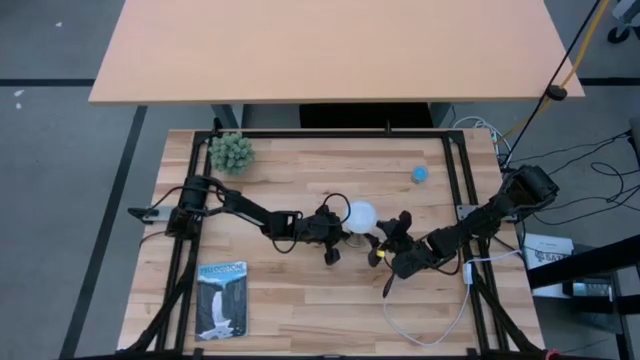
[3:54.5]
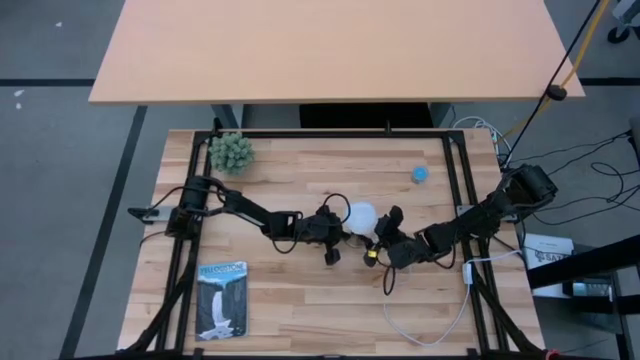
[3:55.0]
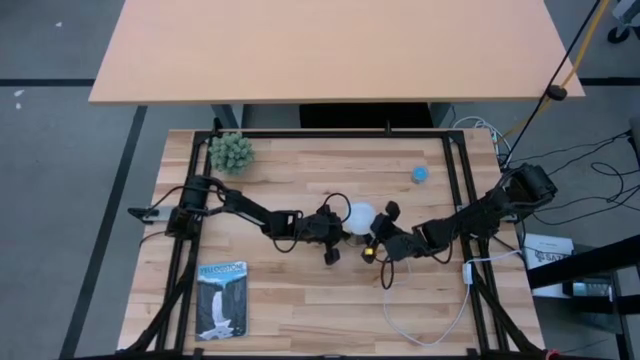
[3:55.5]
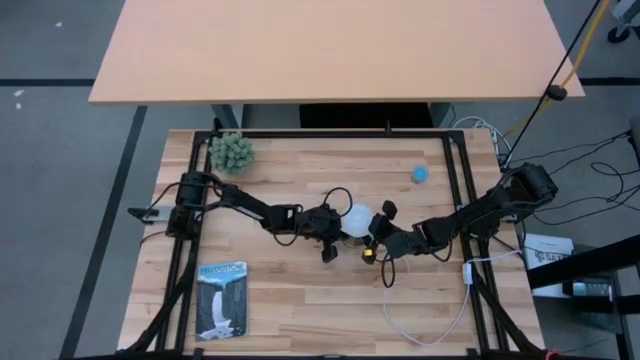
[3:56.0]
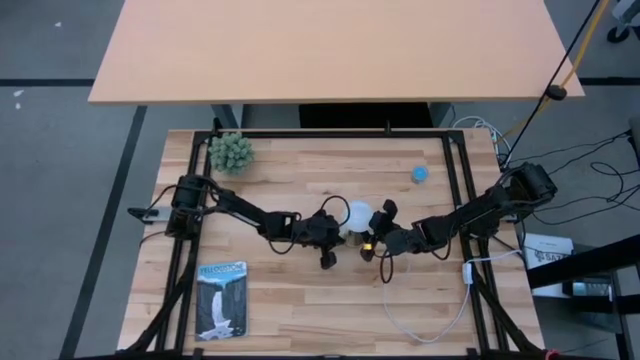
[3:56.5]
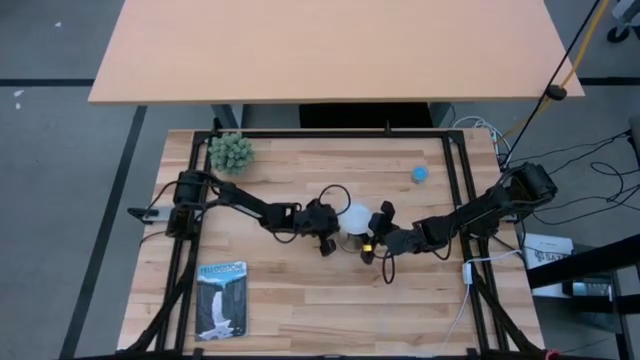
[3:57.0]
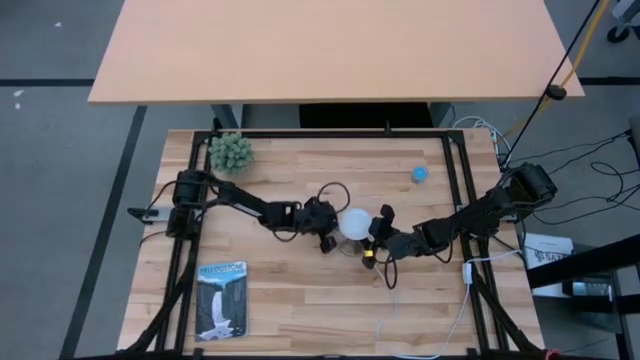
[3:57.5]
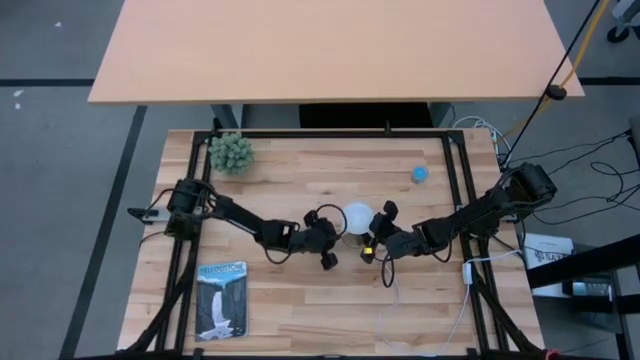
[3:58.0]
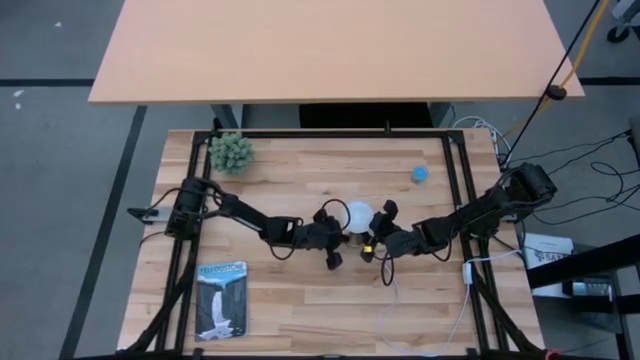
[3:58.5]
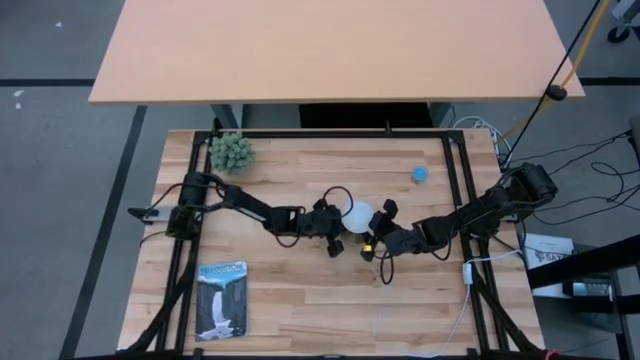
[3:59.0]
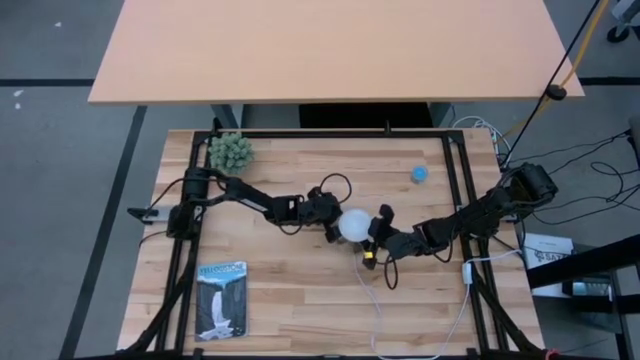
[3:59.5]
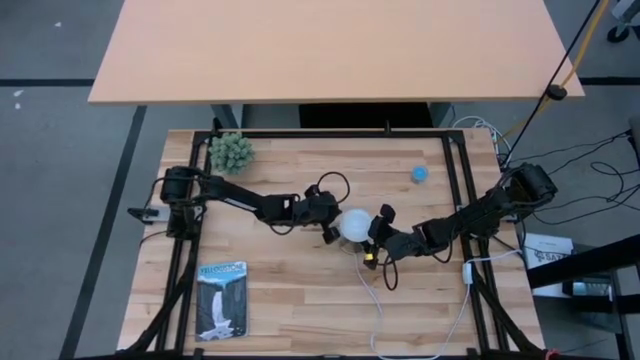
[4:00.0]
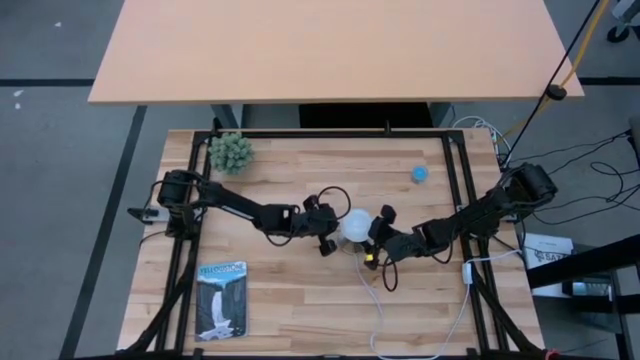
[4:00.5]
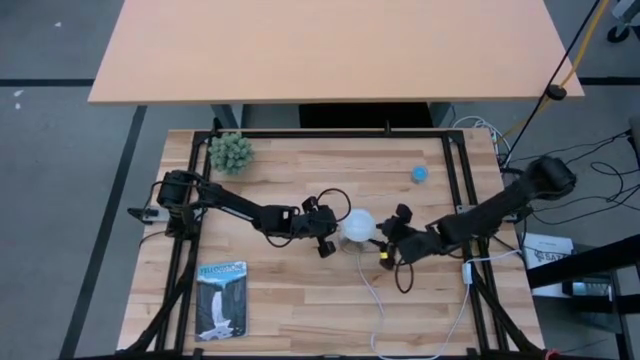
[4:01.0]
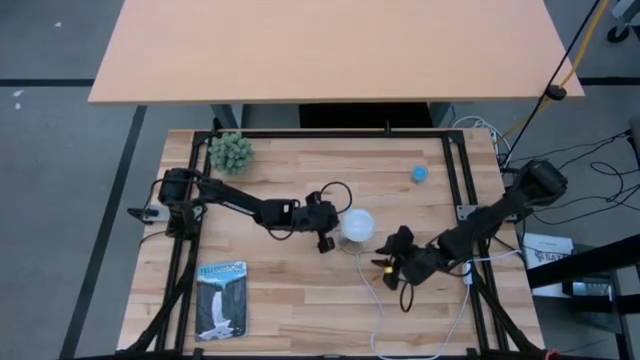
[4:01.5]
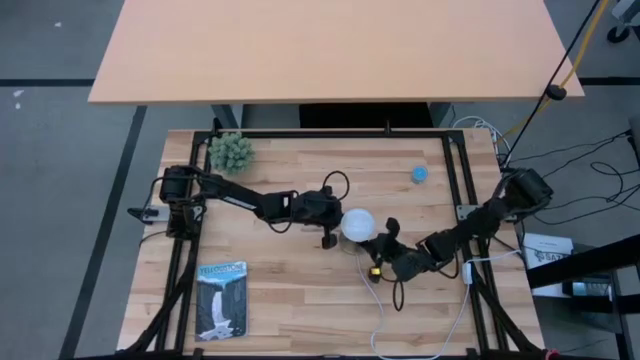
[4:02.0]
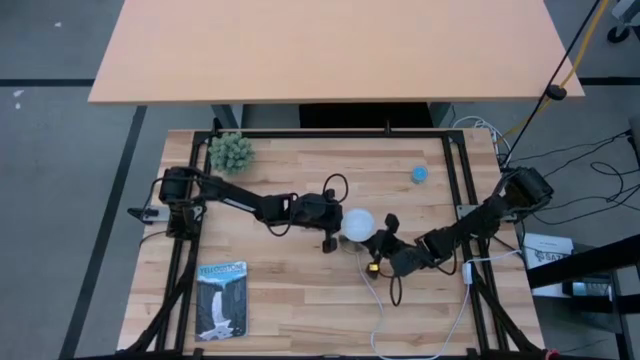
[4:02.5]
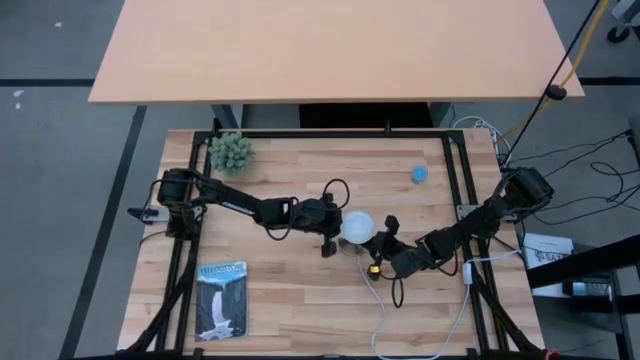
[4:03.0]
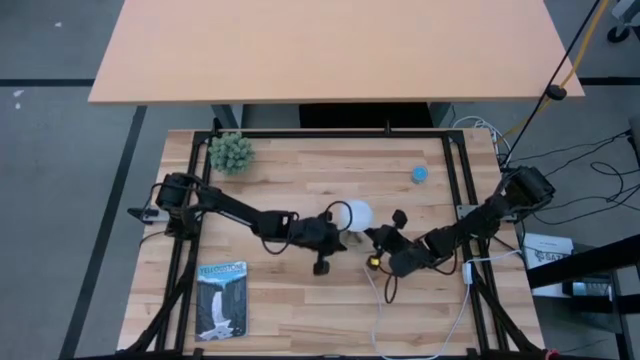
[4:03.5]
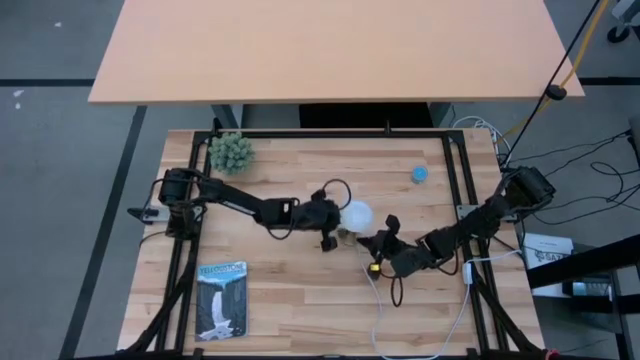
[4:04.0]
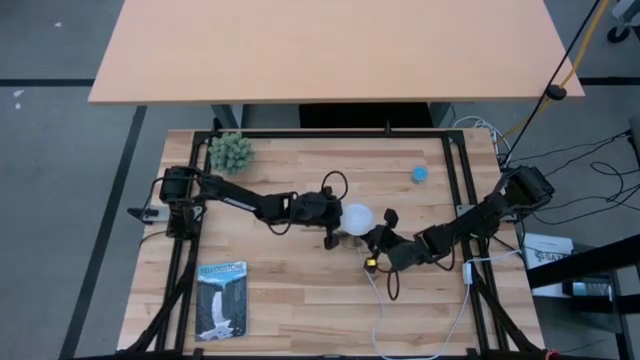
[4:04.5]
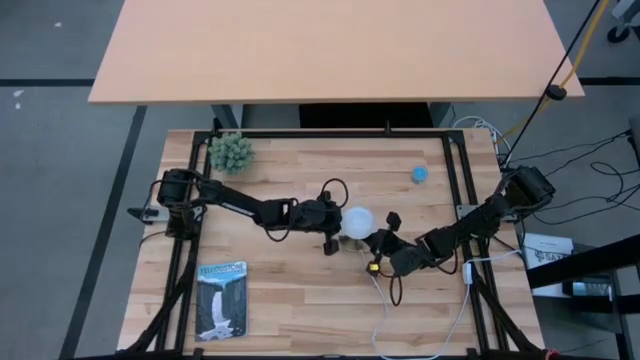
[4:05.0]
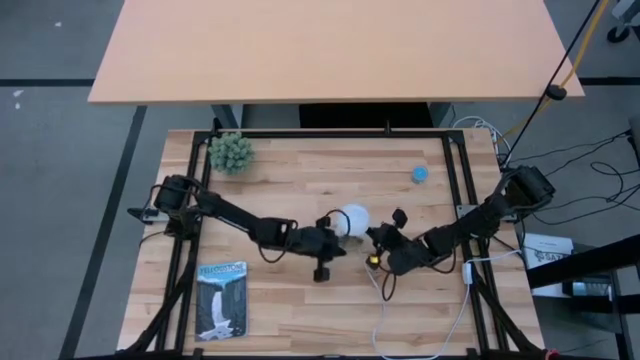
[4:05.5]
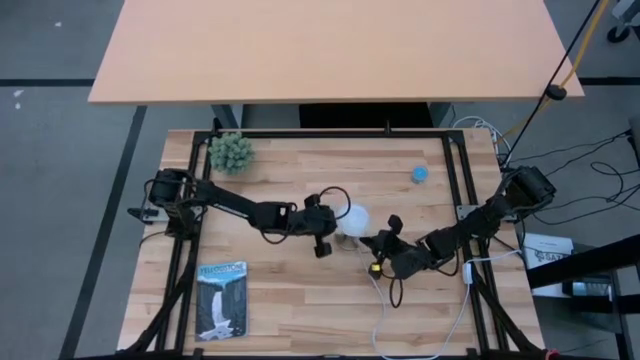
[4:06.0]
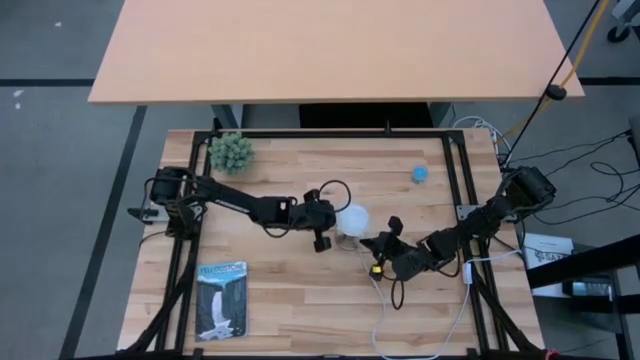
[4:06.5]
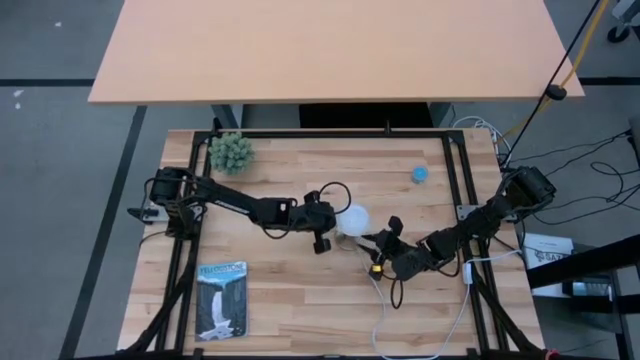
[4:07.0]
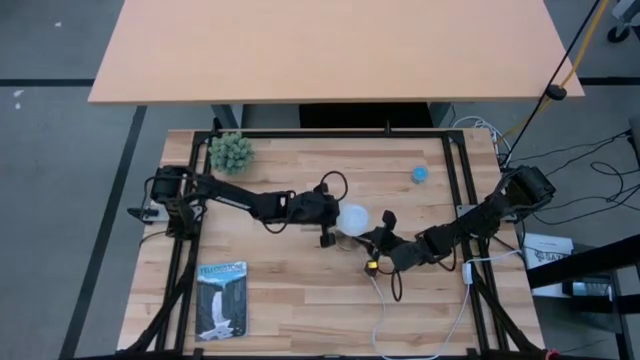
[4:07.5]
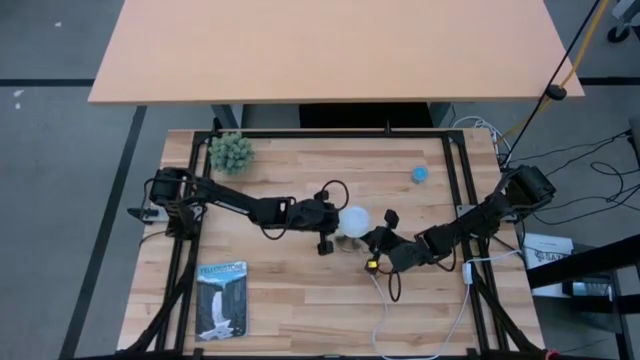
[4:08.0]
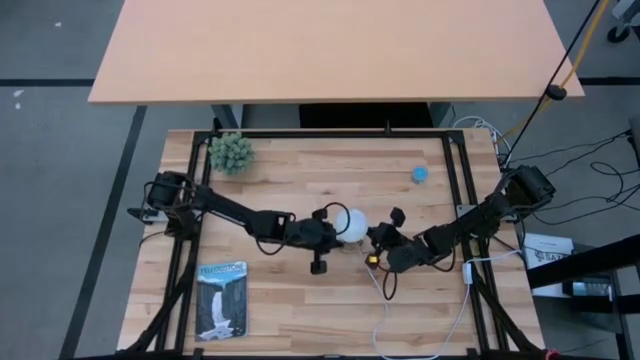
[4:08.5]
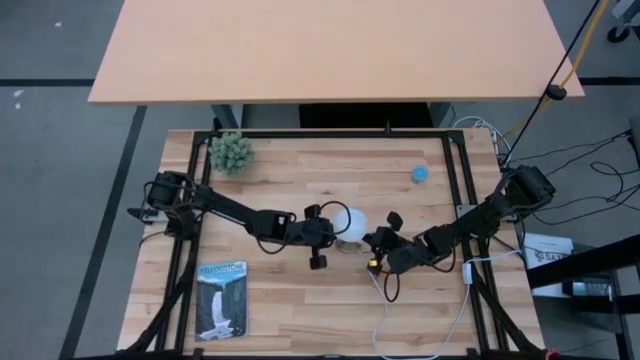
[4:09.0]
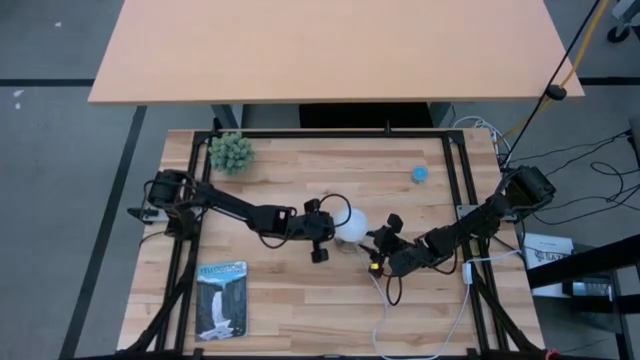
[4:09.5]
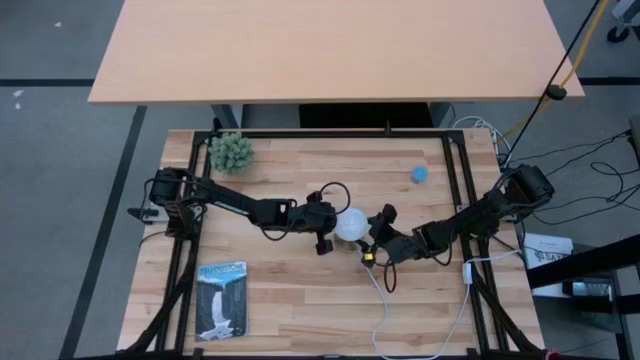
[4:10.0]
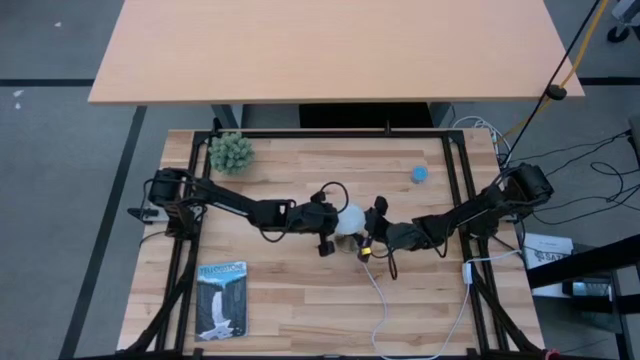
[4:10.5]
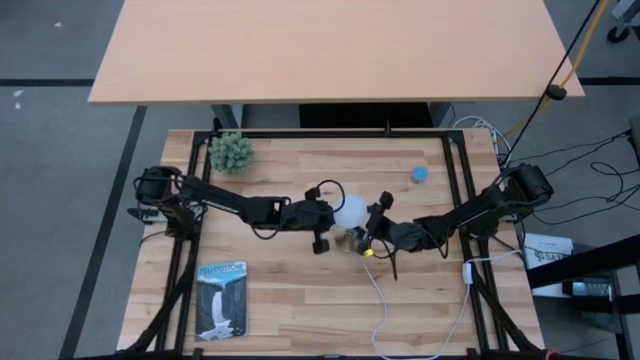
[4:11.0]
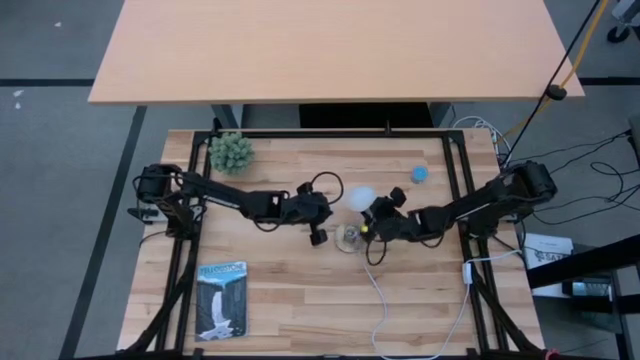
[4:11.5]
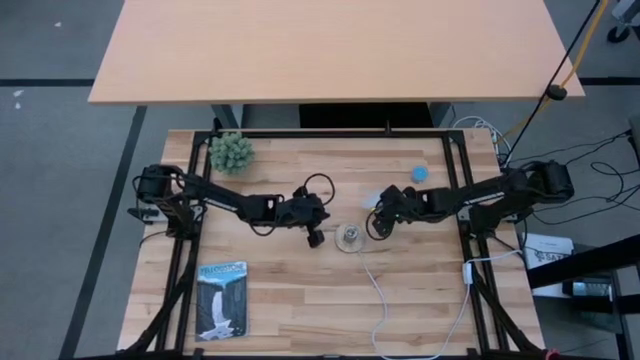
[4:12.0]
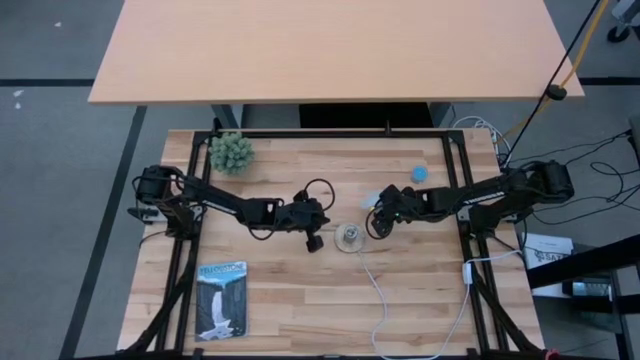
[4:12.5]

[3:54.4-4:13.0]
Task: Screw lightbulb
Remove the lightbulb from the desk lamp

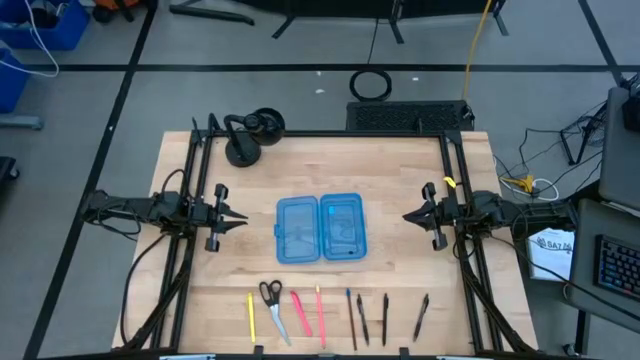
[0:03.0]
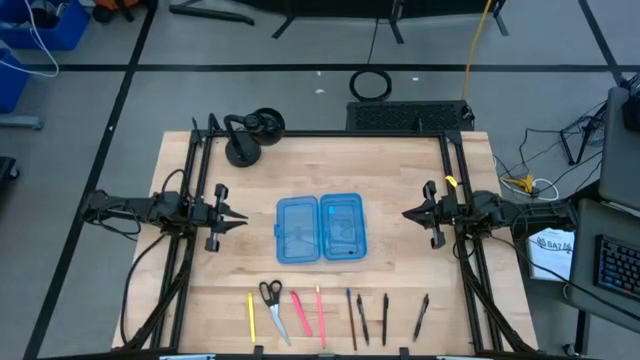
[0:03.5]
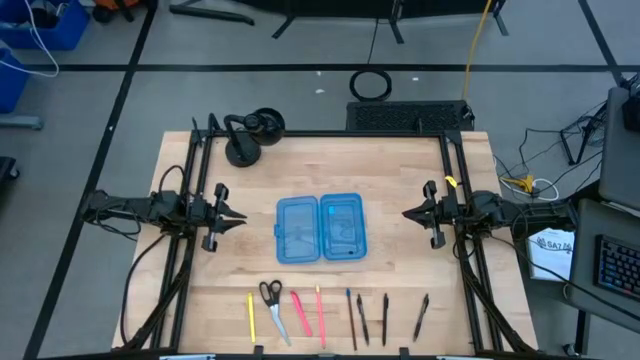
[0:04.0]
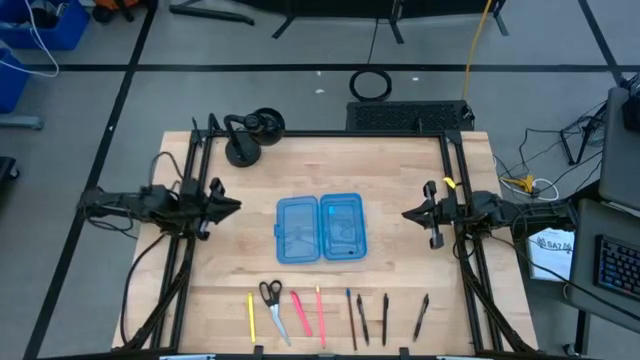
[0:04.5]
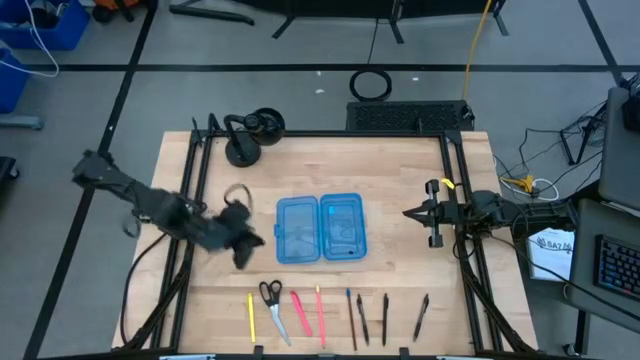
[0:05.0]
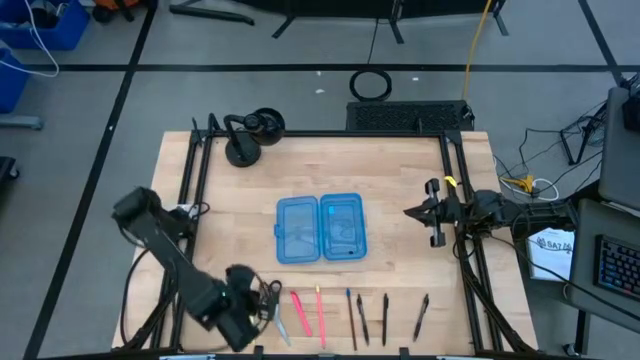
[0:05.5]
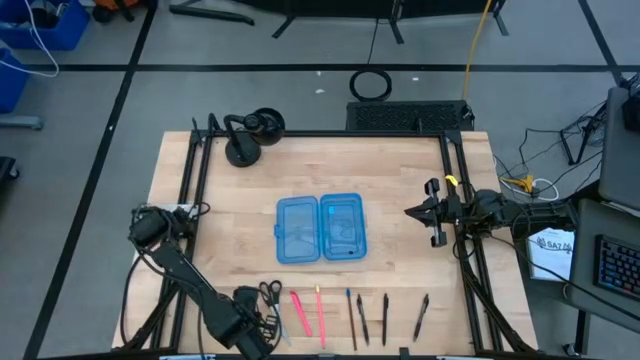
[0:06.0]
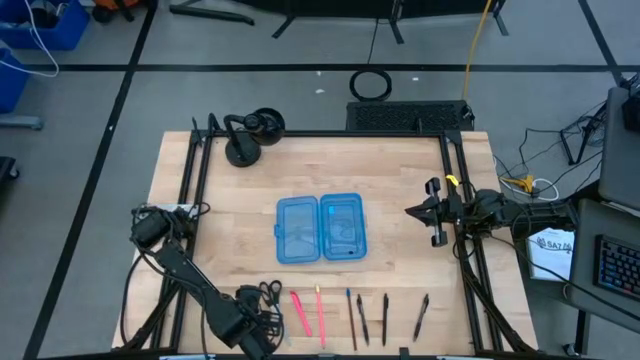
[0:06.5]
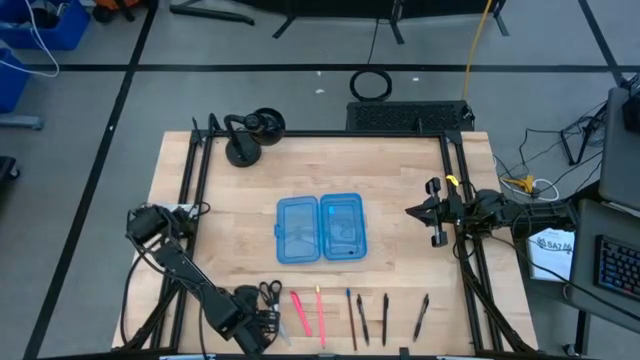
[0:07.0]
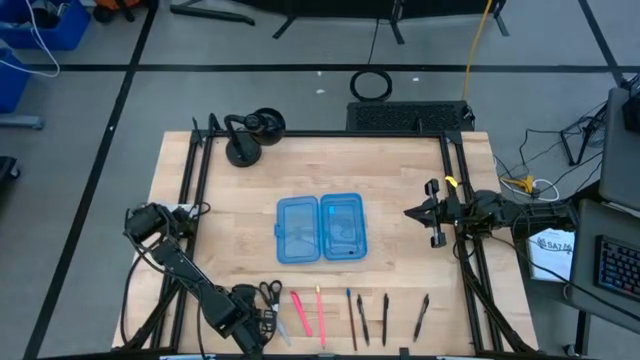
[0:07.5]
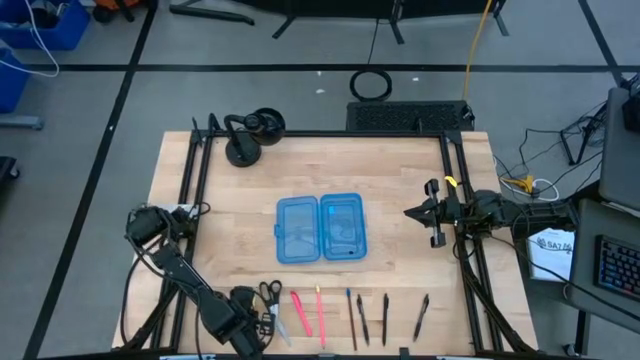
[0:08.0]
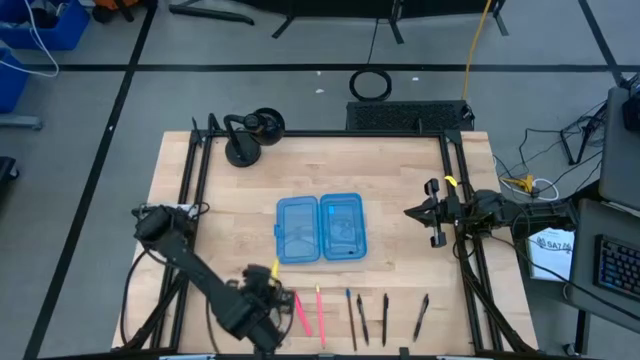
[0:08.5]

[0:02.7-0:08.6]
Task: Pick & place school supplies into a supply box
Put the yellow pen into the blue supply box
